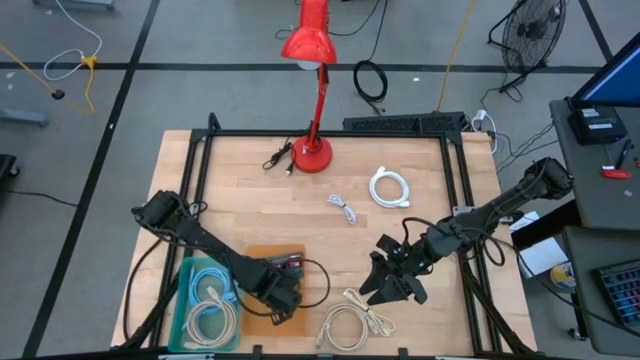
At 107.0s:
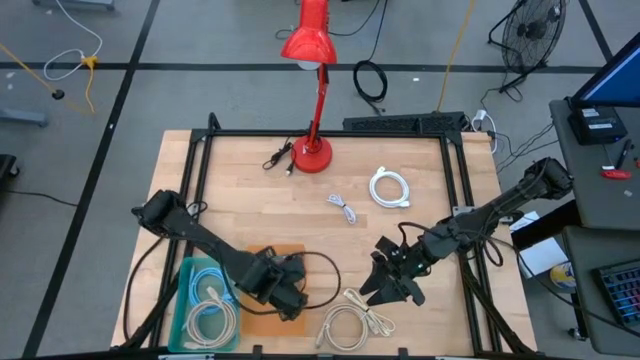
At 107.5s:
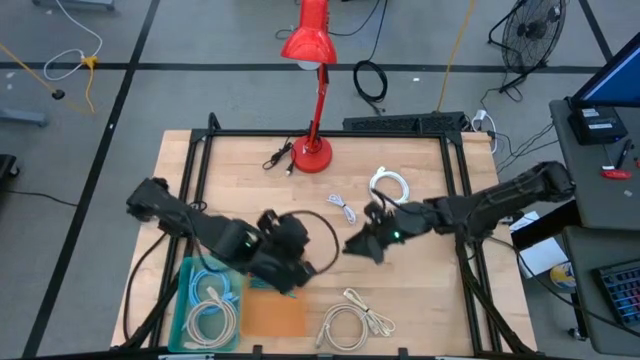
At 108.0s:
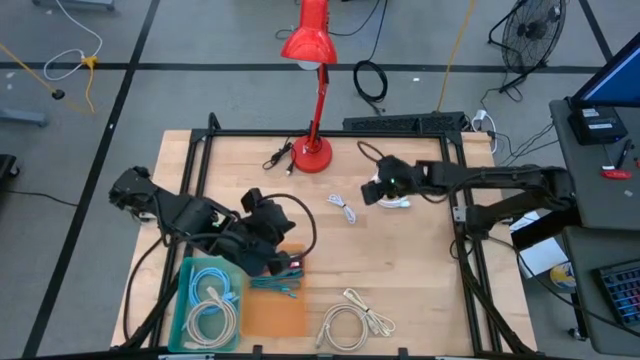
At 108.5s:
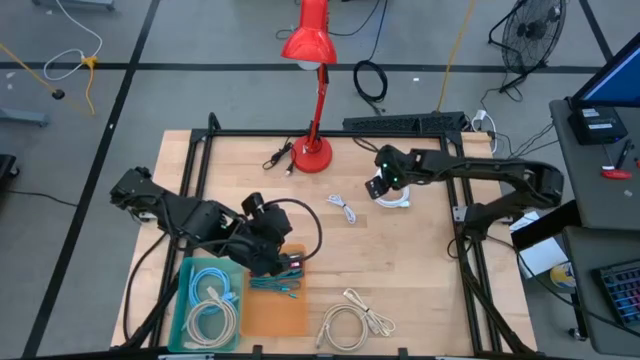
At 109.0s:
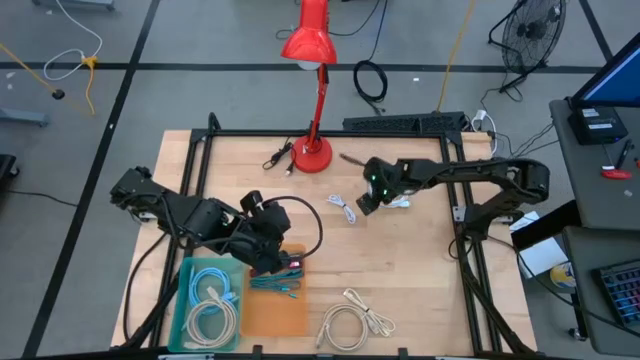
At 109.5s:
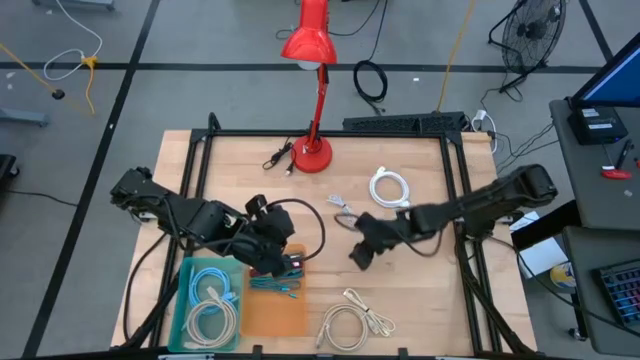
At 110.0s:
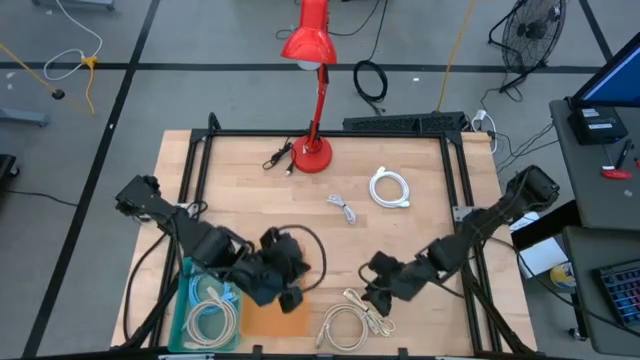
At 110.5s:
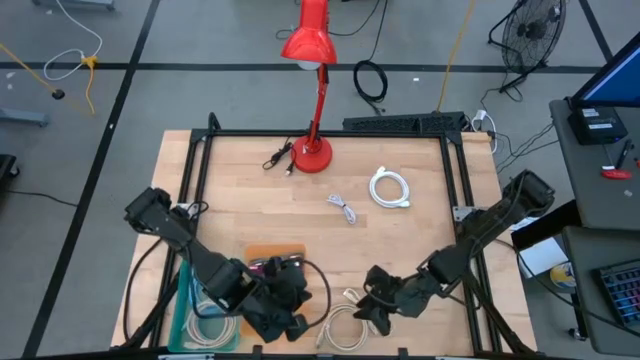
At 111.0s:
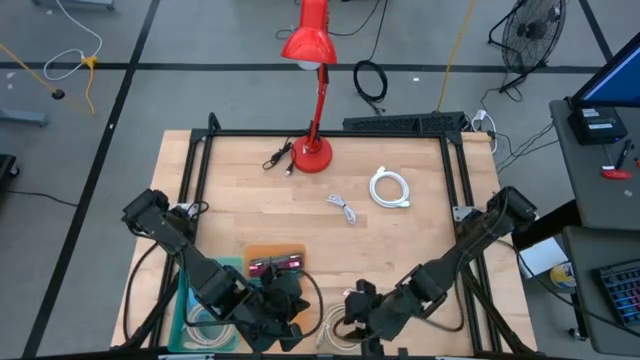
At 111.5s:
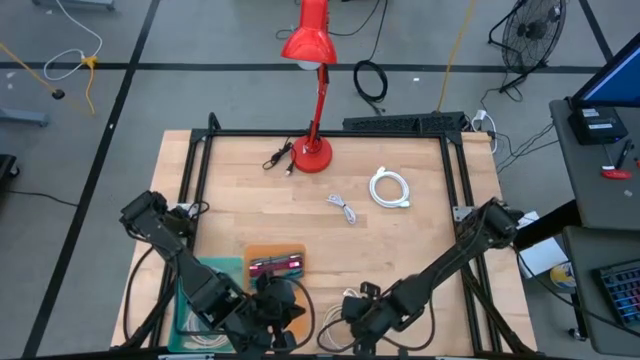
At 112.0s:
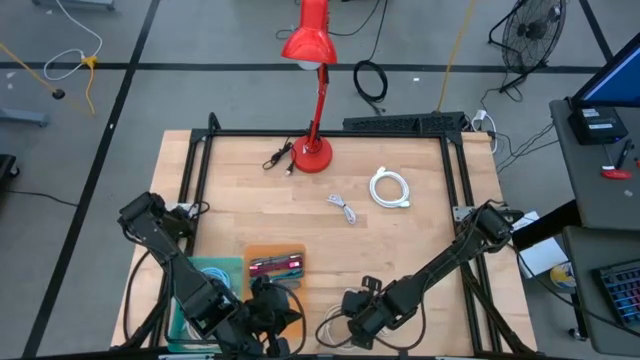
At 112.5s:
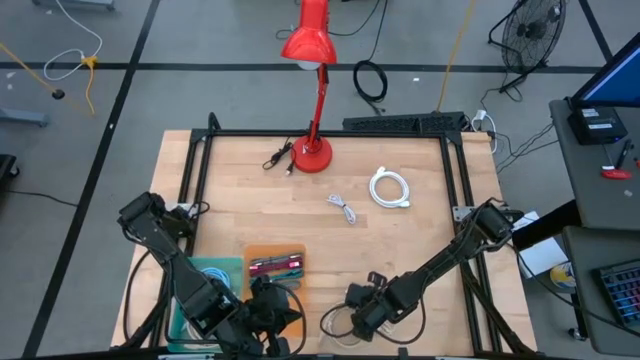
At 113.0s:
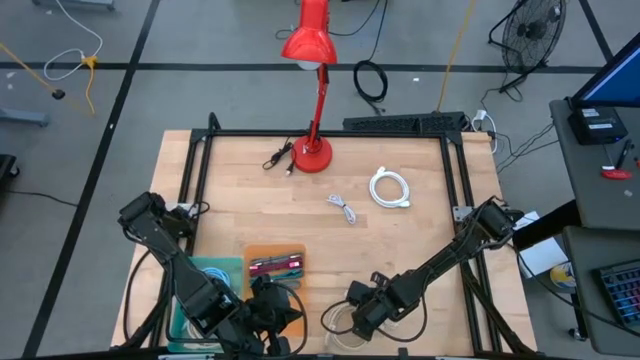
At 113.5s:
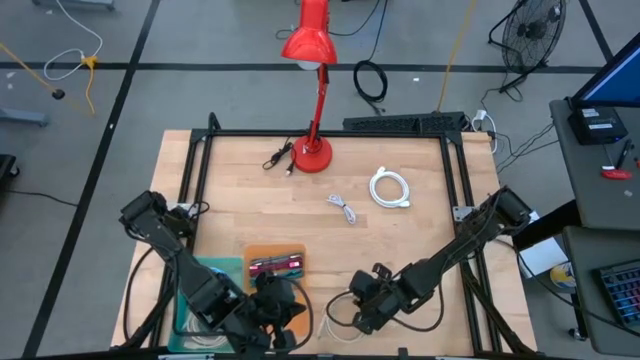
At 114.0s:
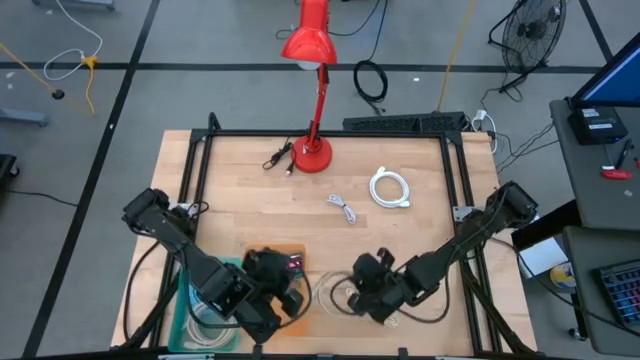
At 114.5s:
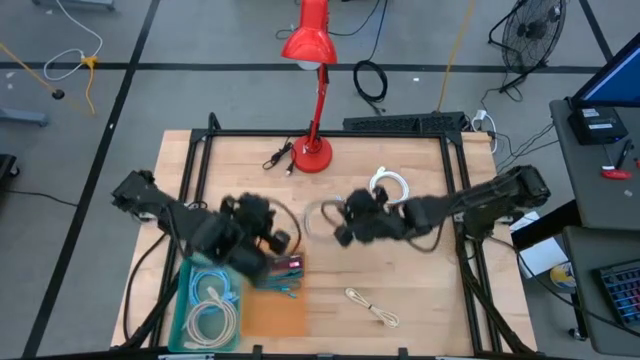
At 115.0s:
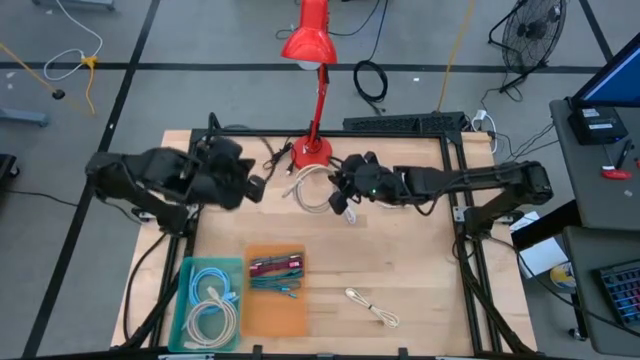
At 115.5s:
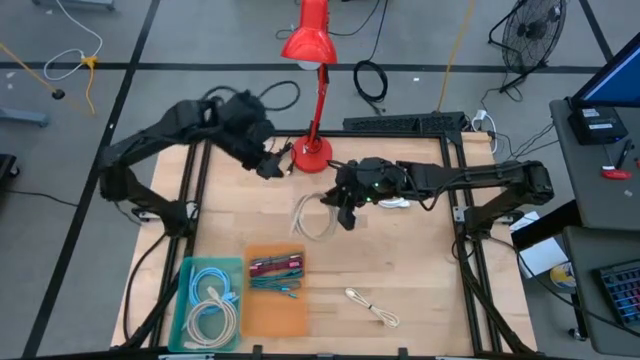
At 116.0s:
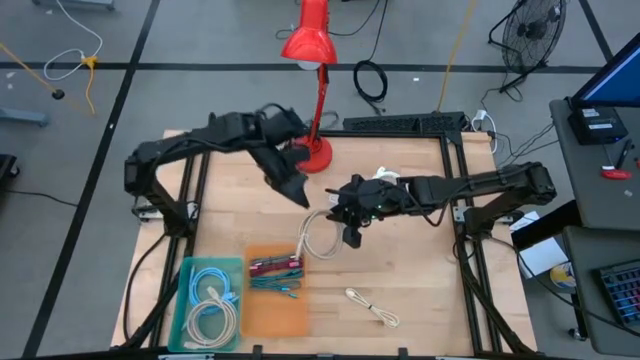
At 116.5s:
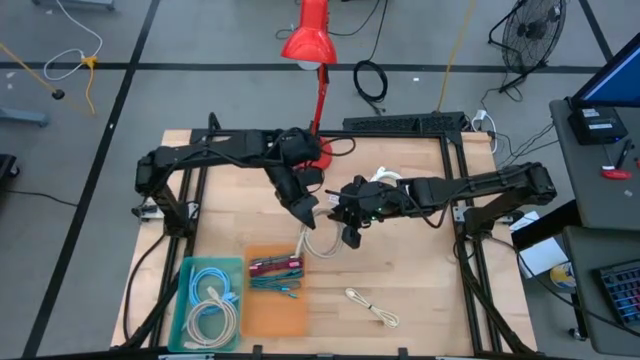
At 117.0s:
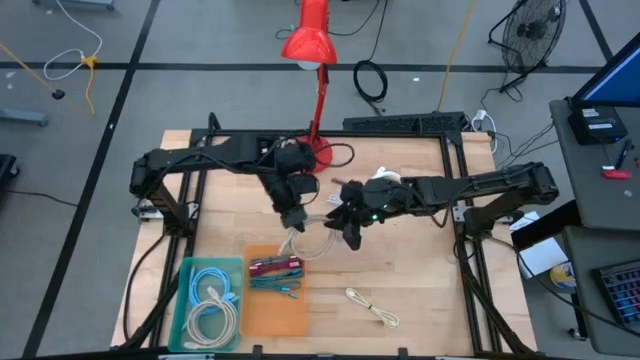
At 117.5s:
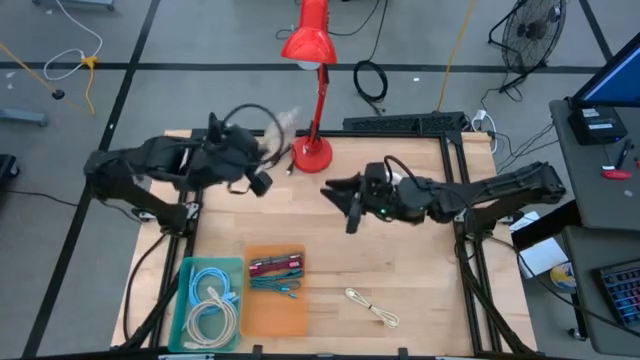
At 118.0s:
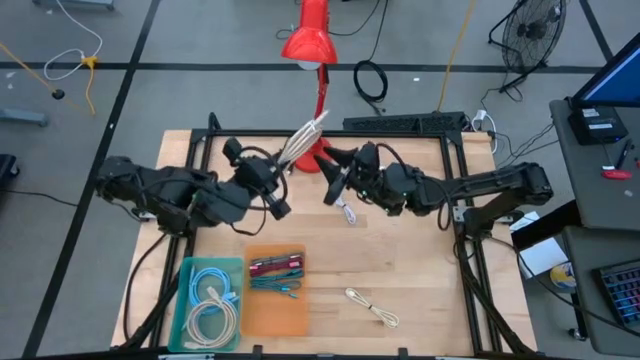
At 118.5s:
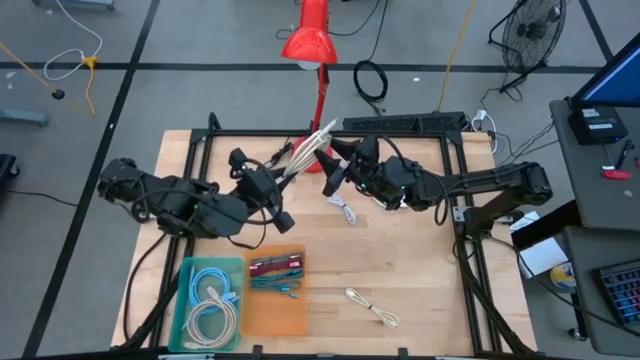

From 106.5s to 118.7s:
Task: Pick & Place USB Port
Put the bottom brown USB cable into the blue bin

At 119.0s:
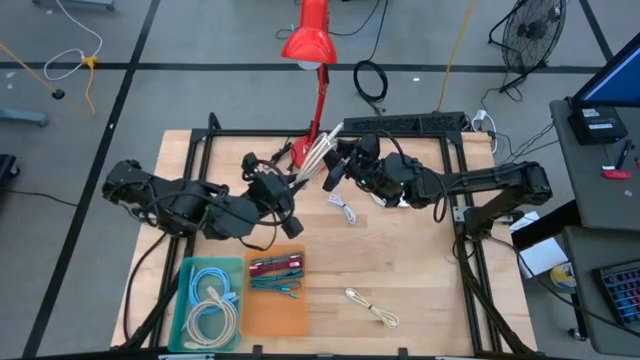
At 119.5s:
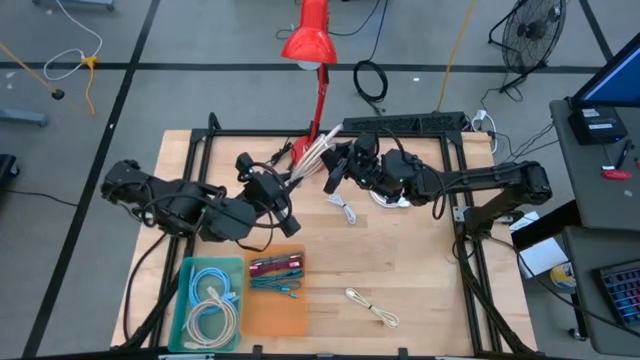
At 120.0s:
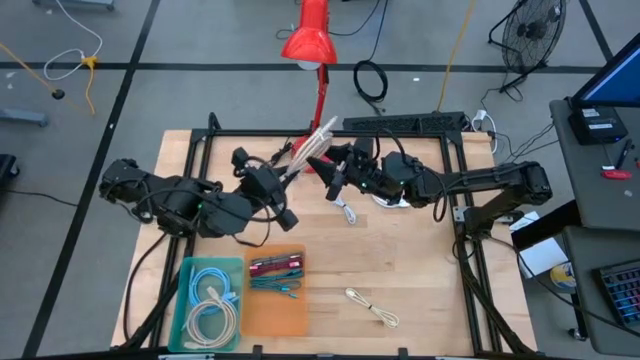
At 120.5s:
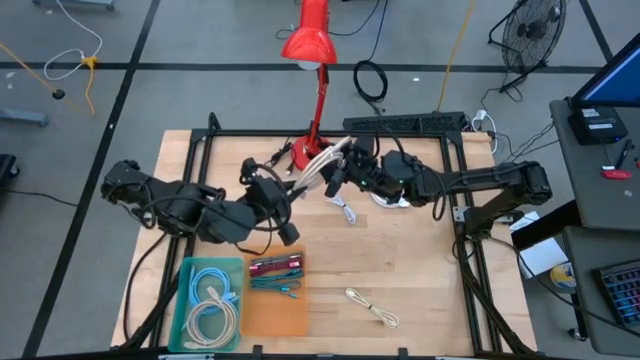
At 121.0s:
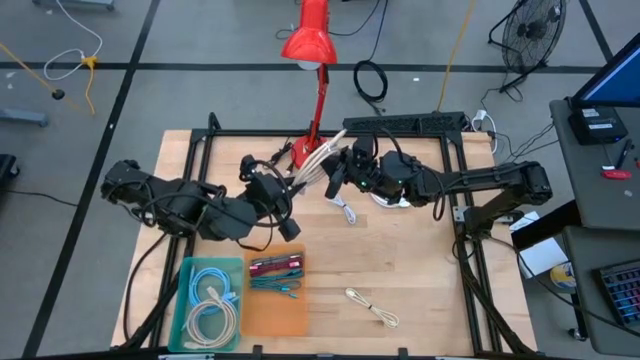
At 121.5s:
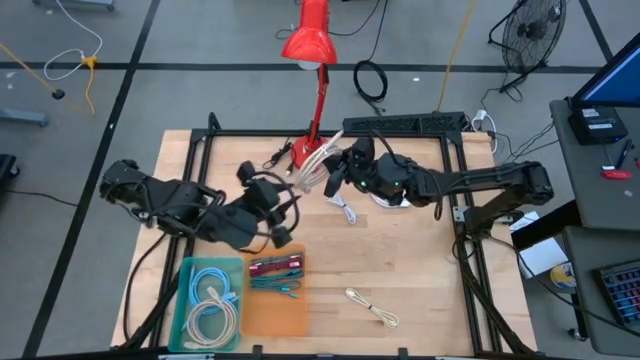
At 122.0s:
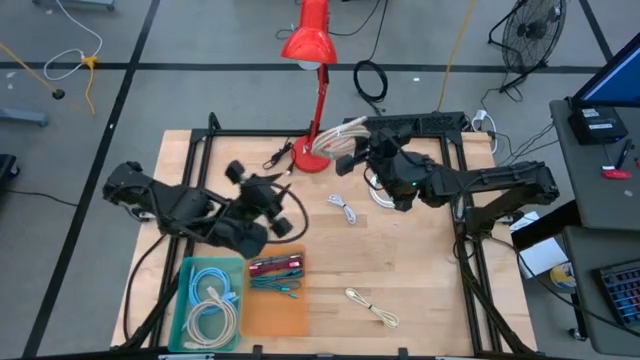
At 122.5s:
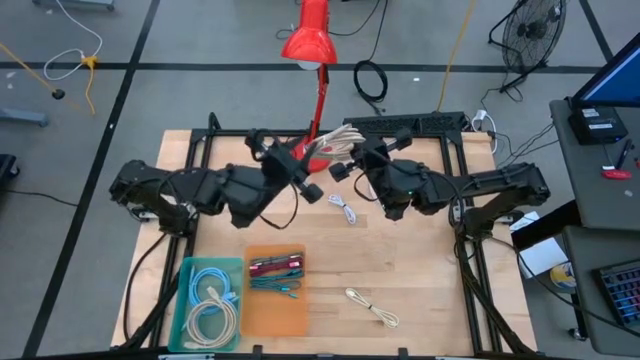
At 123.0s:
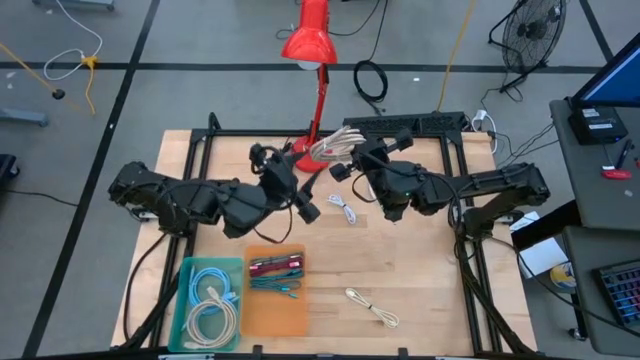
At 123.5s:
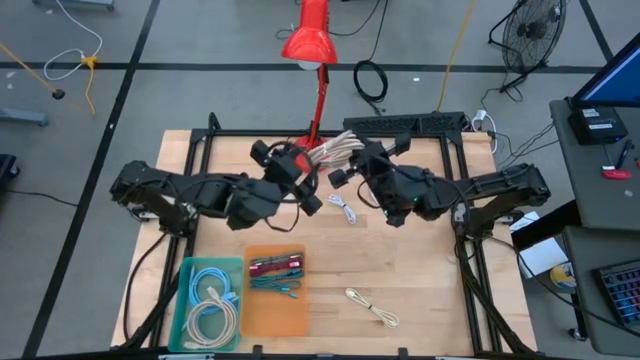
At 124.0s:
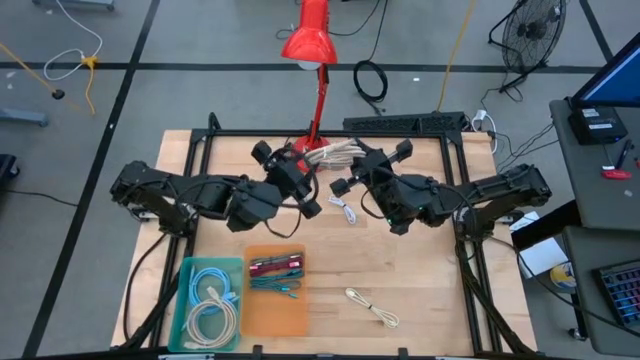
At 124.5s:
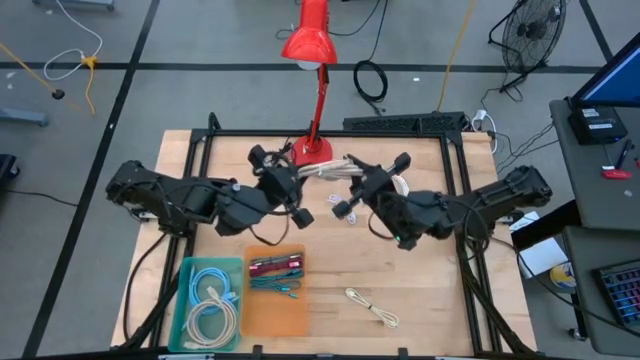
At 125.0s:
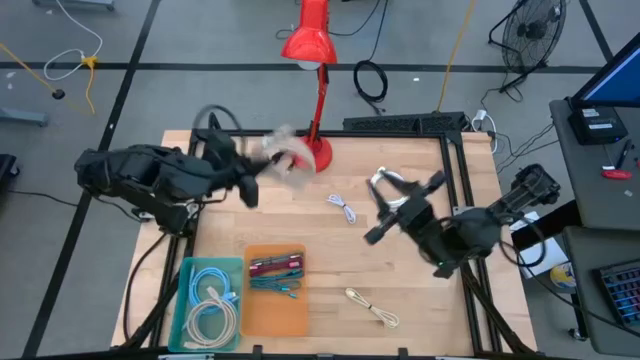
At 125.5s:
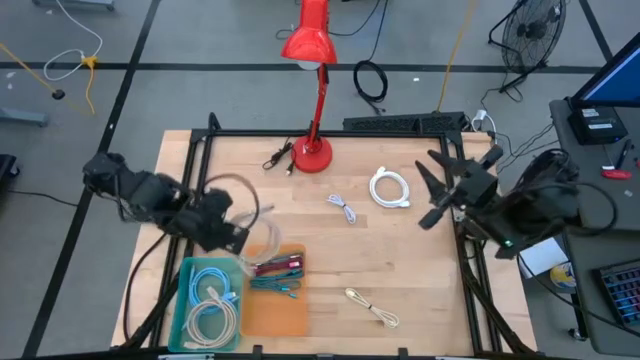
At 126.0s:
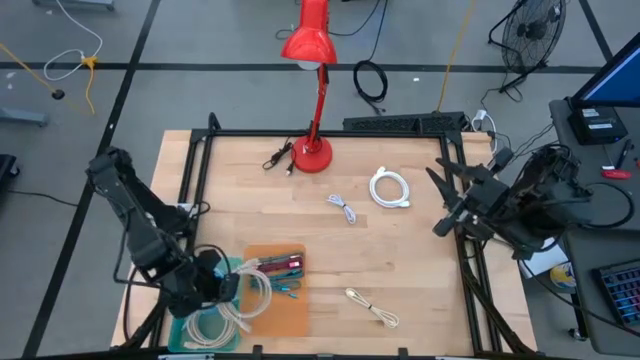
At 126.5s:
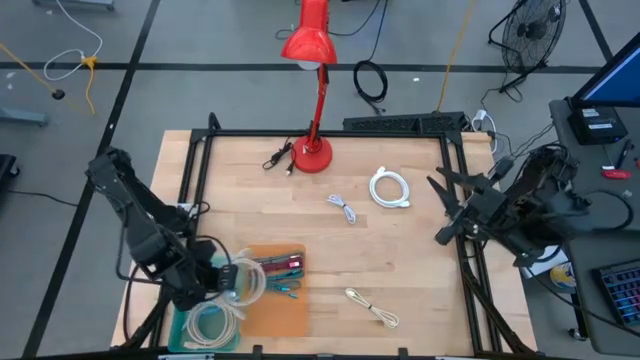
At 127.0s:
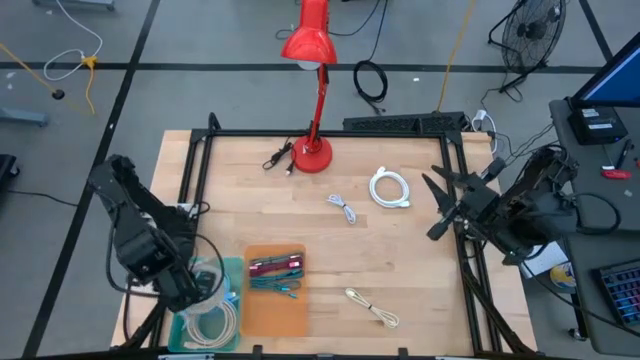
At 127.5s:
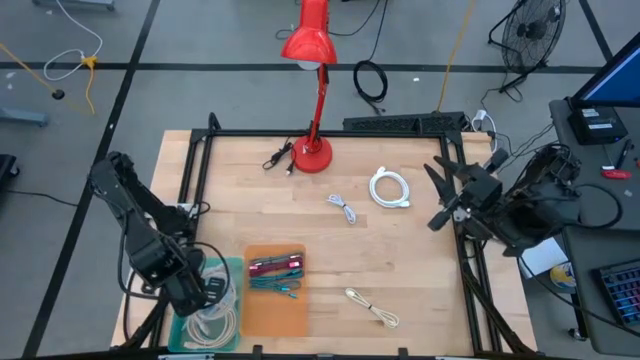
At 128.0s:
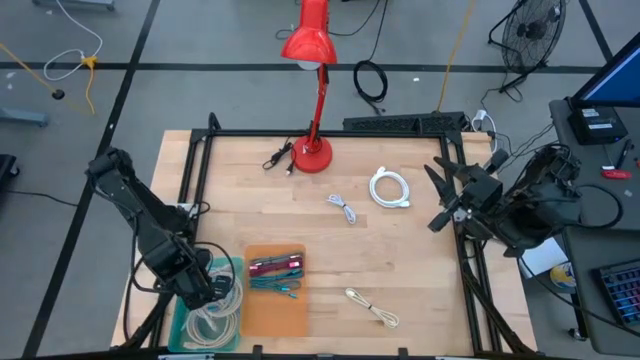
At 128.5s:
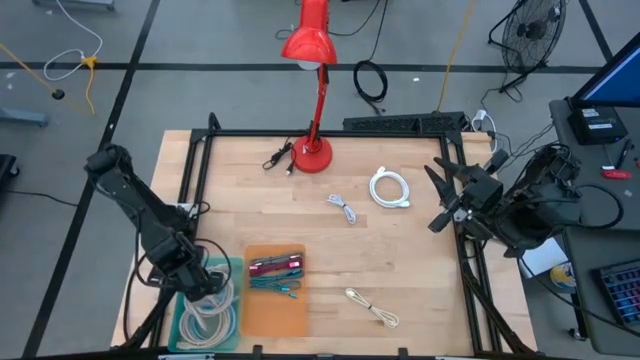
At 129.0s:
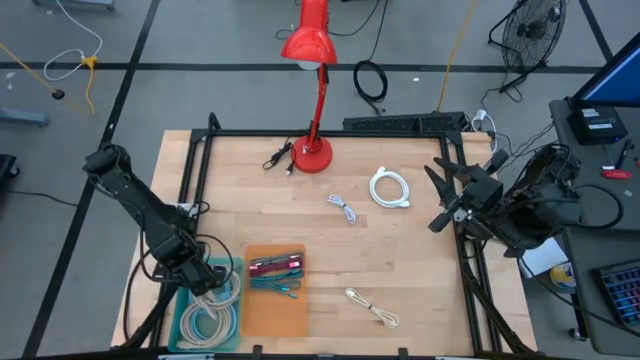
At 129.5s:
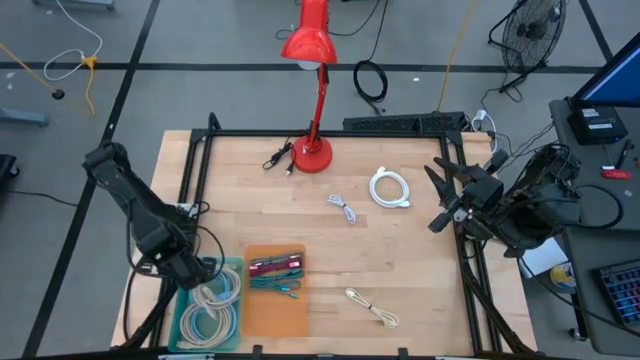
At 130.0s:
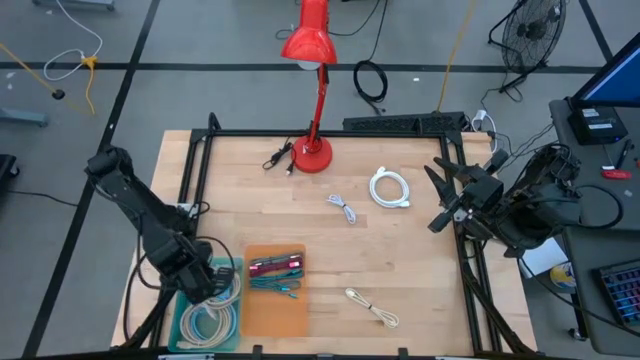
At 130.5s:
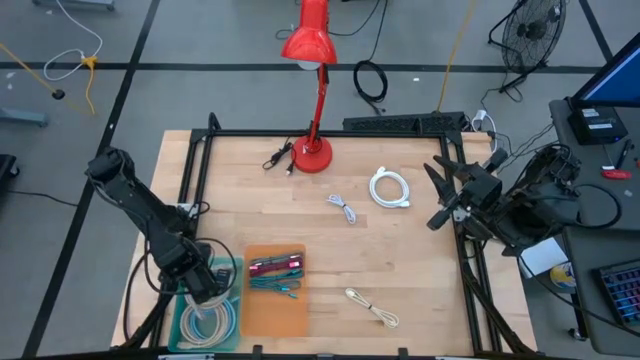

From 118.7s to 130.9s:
Put the bottom brown USB cable into the blue bin
